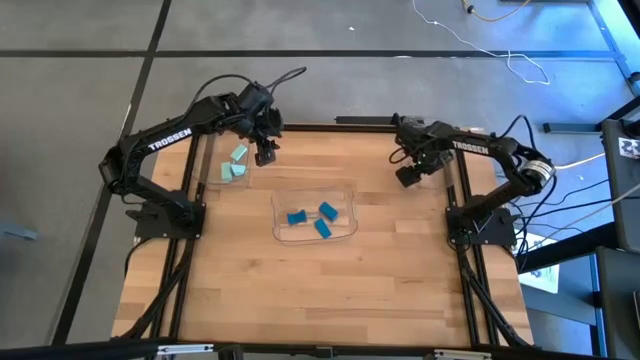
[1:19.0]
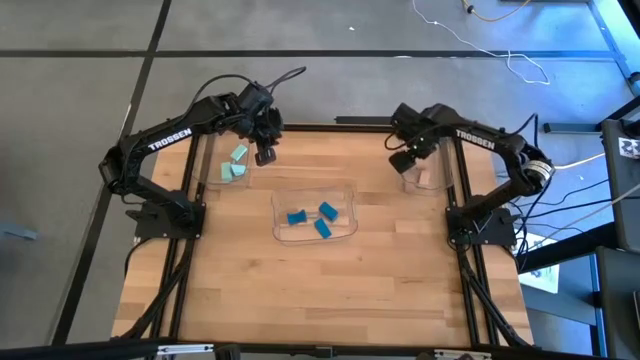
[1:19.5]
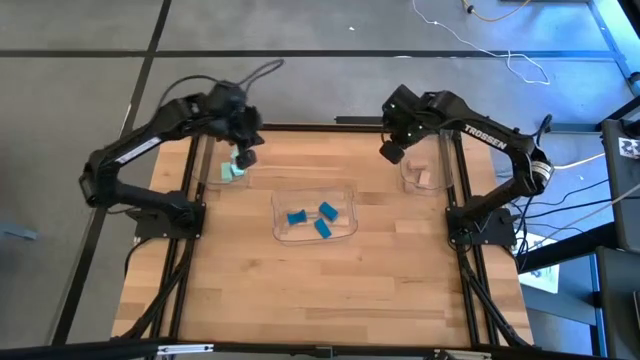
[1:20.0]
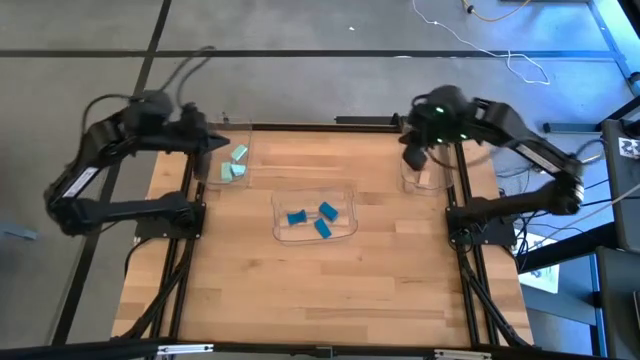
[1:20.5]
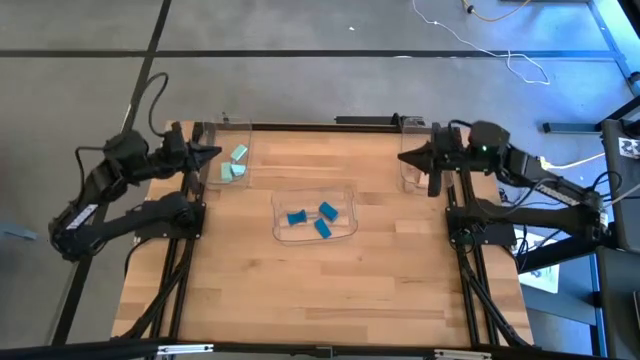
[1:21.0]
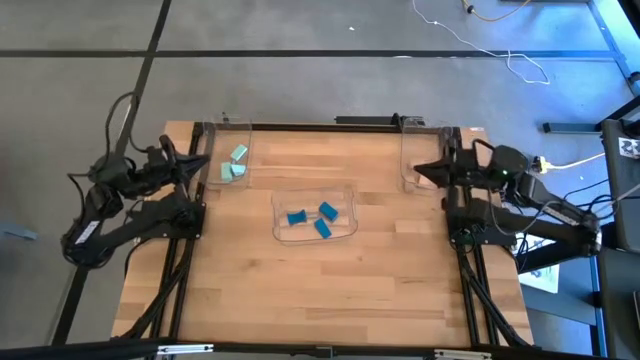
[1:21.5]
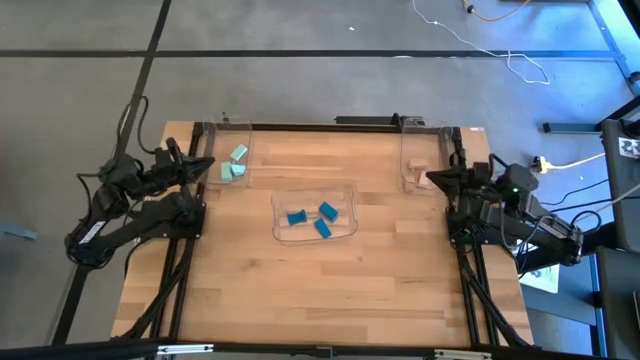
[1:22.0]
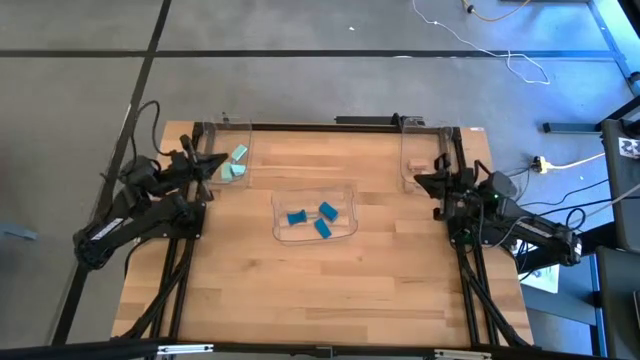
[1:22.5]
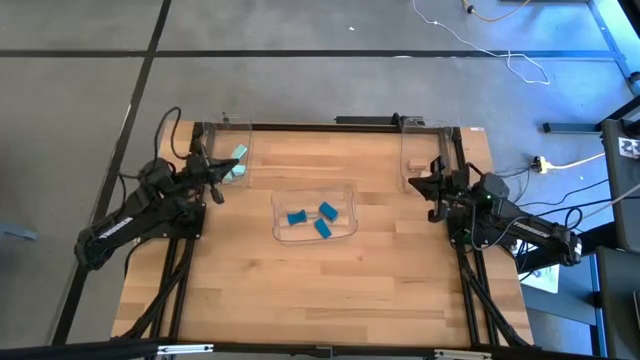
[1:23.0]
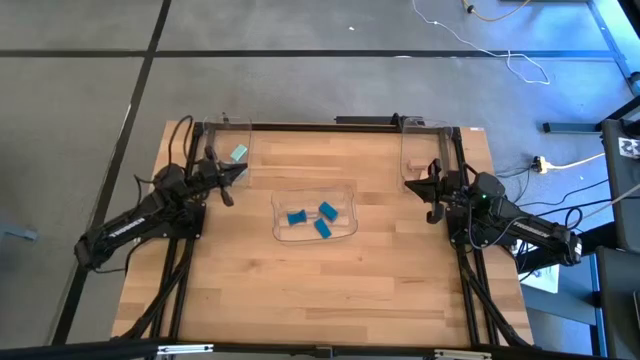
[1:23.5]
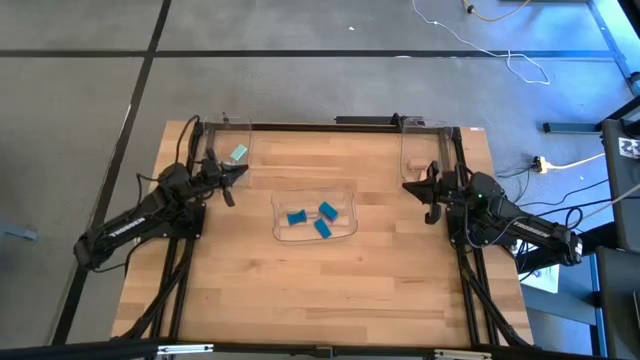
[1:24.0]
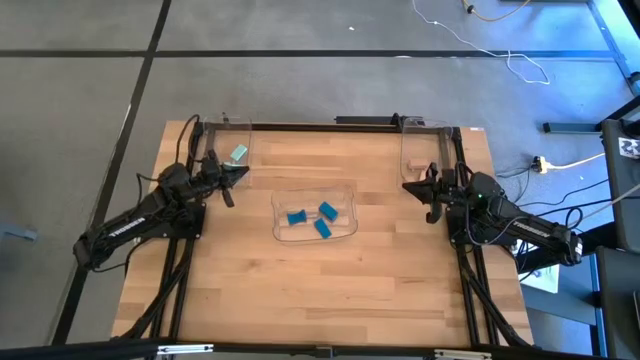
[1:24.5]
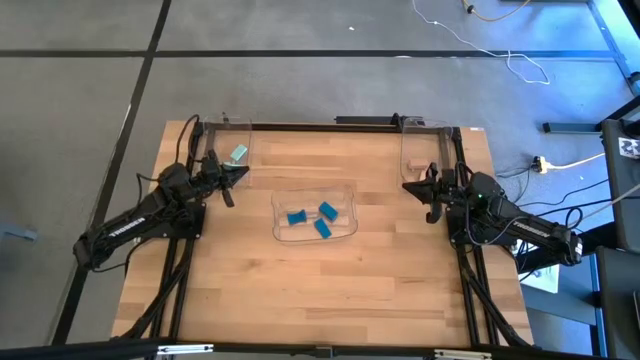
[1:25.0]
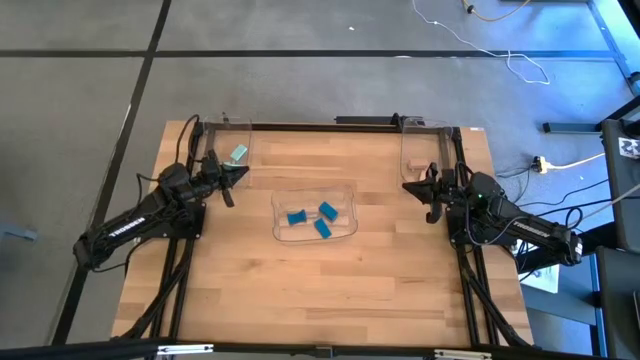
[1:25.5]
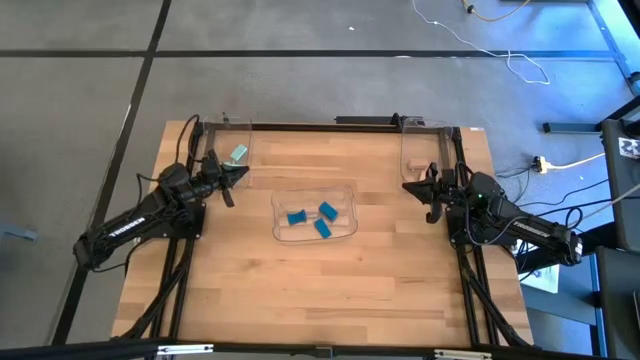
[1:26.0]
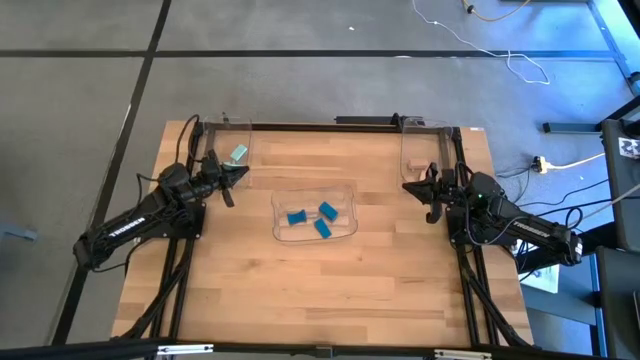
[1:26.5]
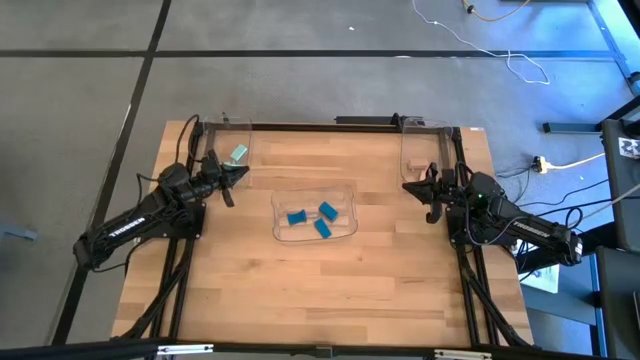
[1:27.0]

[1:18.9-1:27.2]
Task: Sort & place blocks by color
Return to Home Position

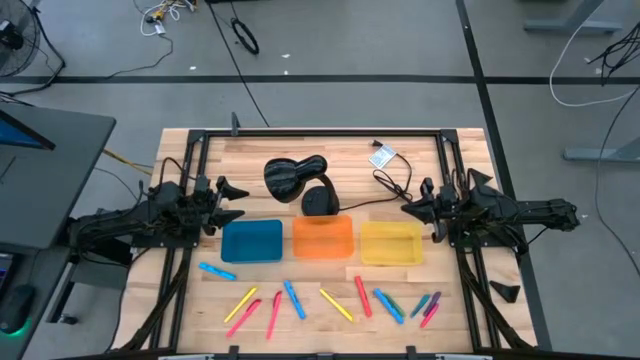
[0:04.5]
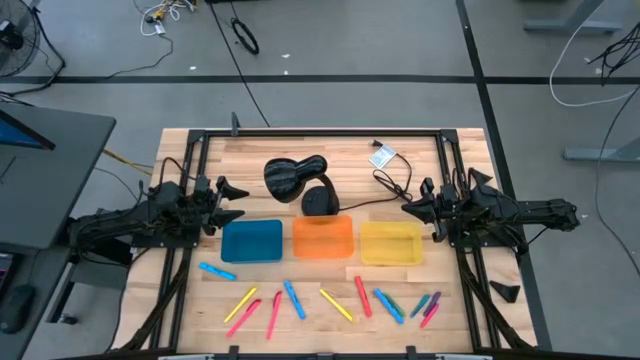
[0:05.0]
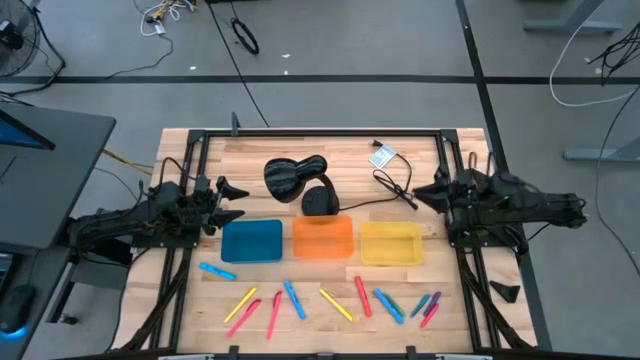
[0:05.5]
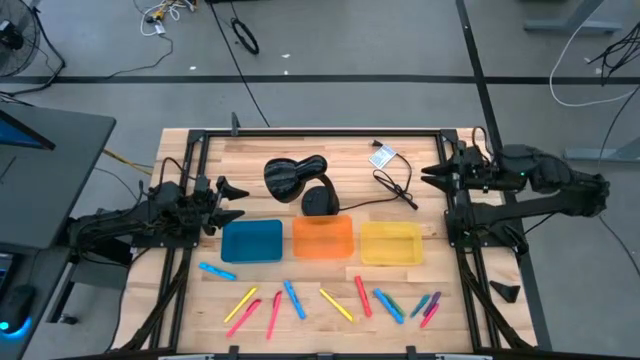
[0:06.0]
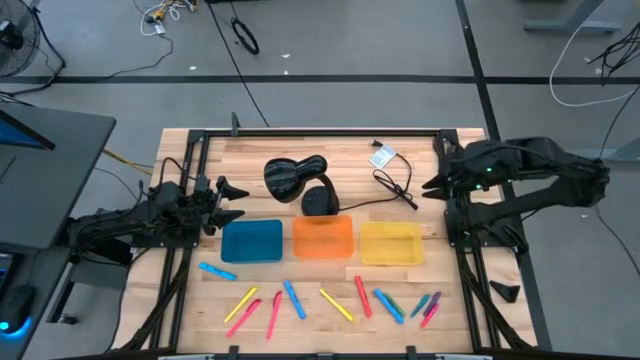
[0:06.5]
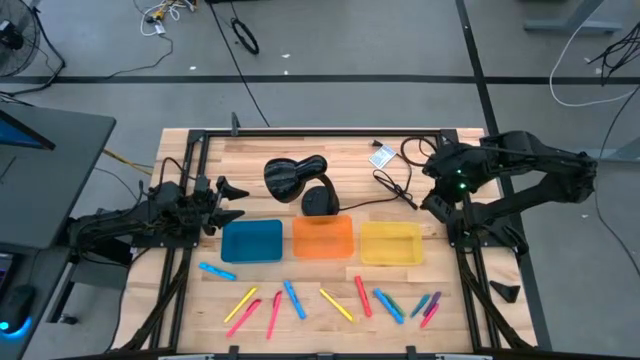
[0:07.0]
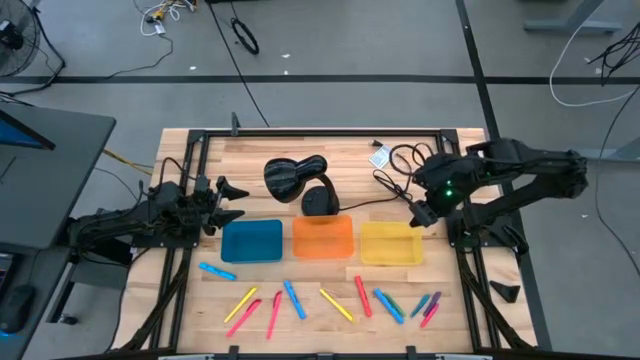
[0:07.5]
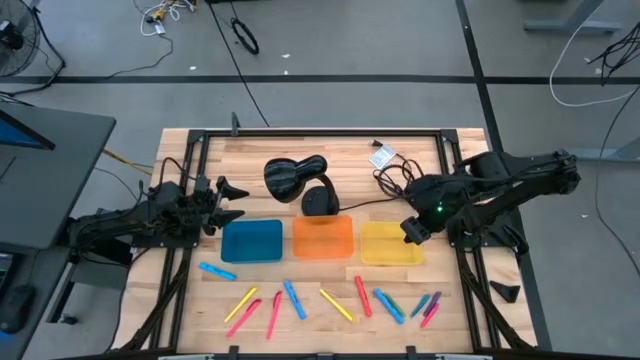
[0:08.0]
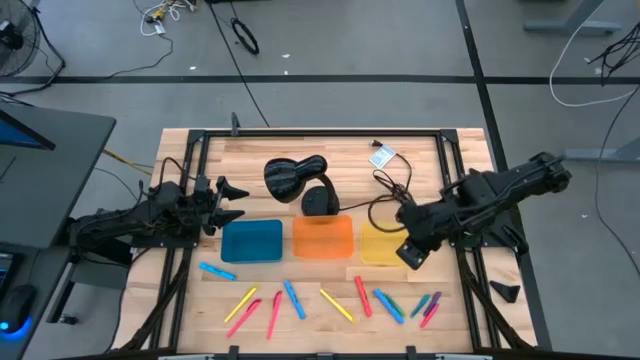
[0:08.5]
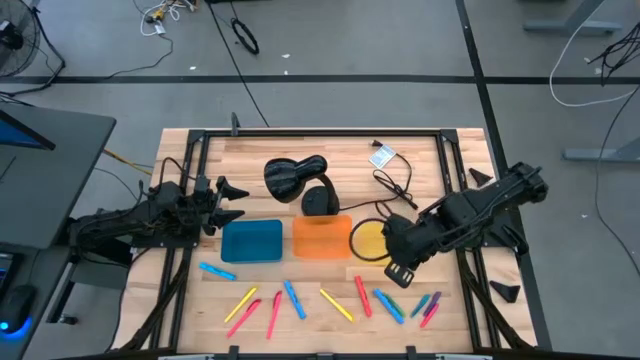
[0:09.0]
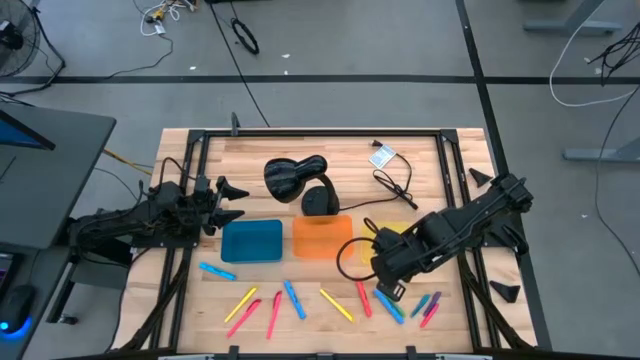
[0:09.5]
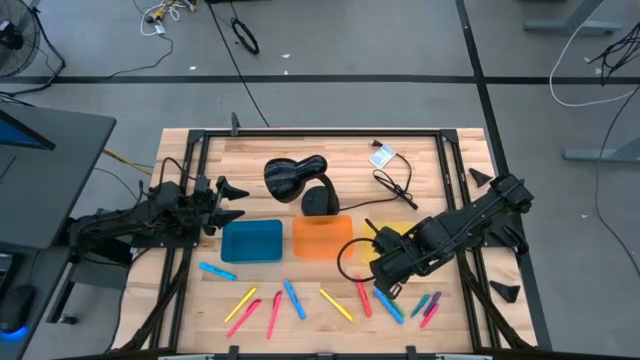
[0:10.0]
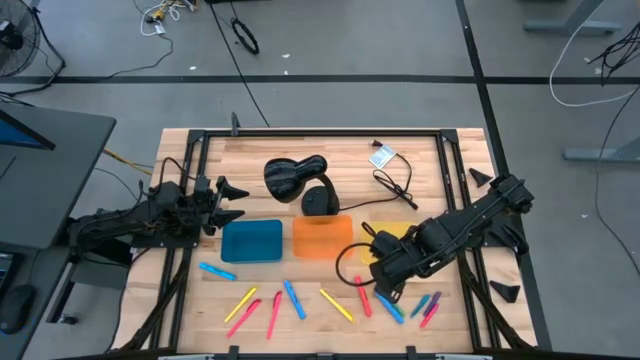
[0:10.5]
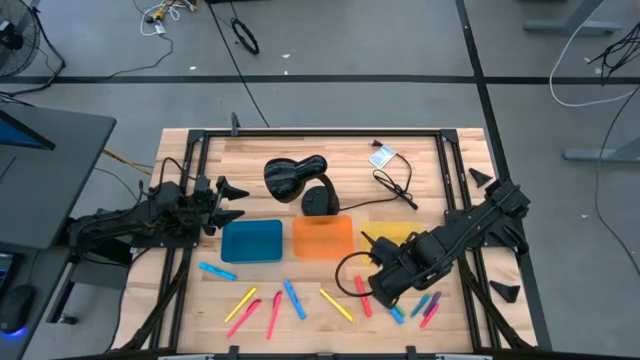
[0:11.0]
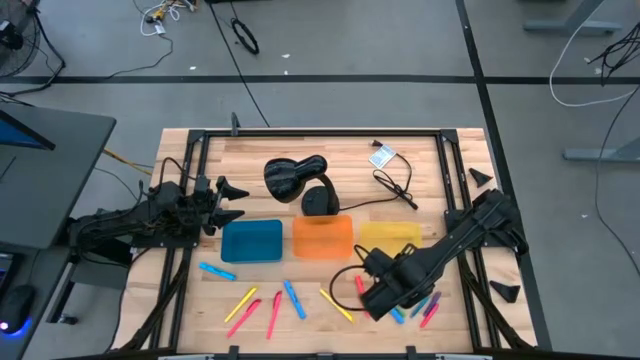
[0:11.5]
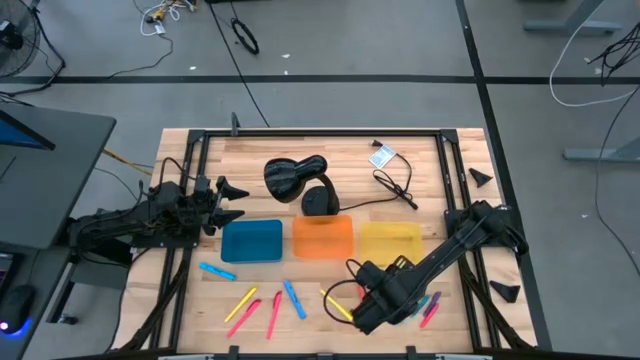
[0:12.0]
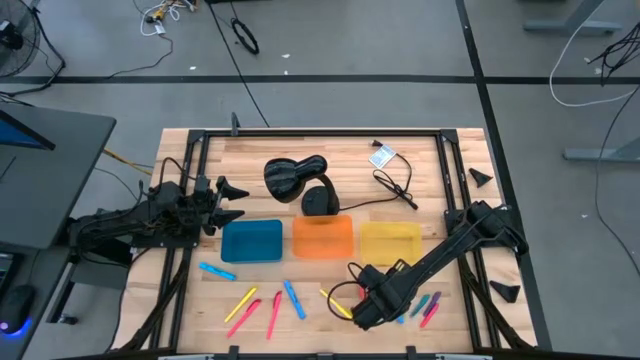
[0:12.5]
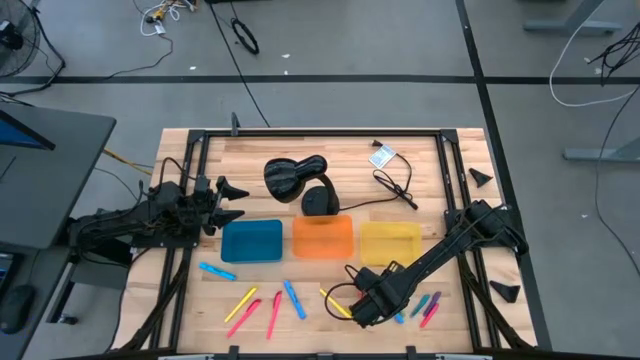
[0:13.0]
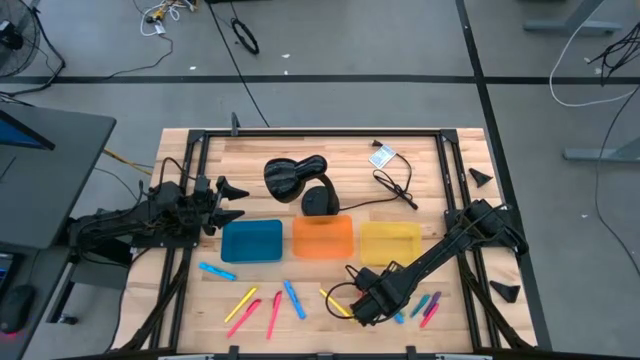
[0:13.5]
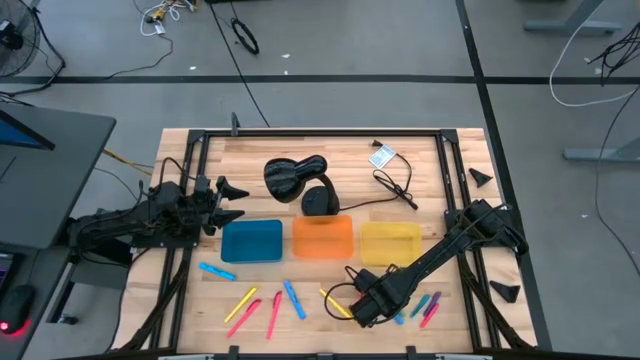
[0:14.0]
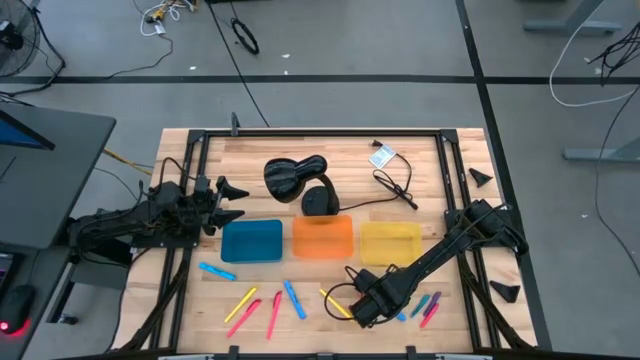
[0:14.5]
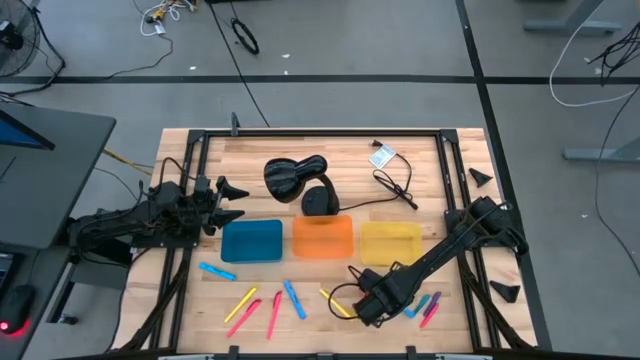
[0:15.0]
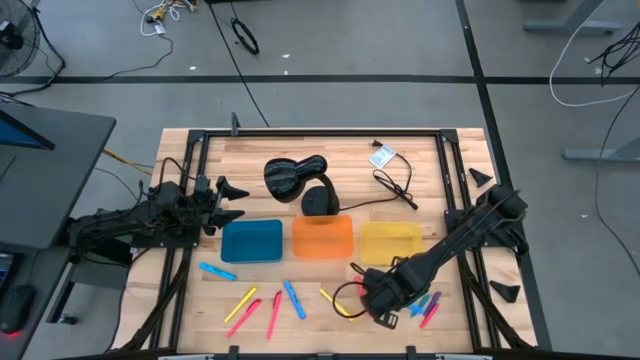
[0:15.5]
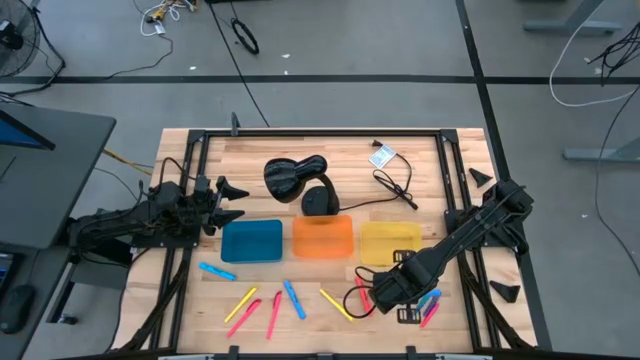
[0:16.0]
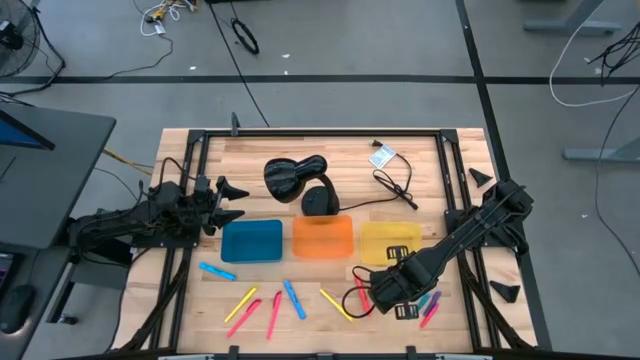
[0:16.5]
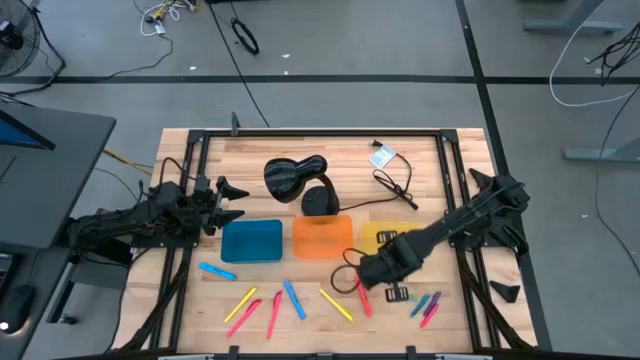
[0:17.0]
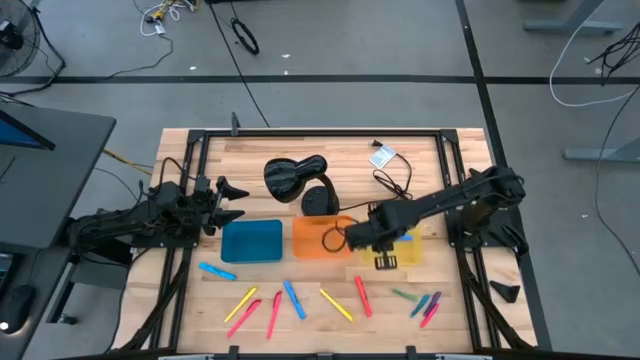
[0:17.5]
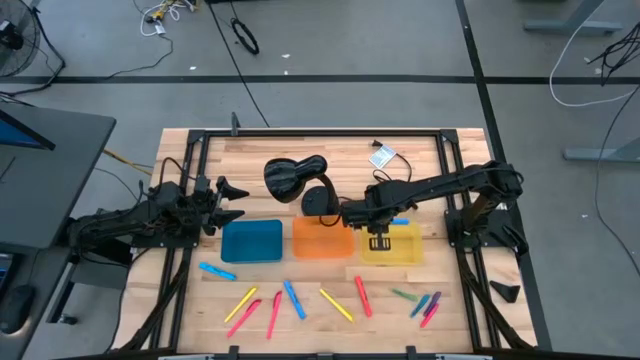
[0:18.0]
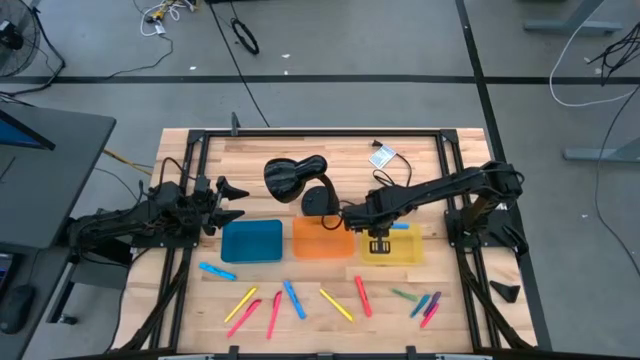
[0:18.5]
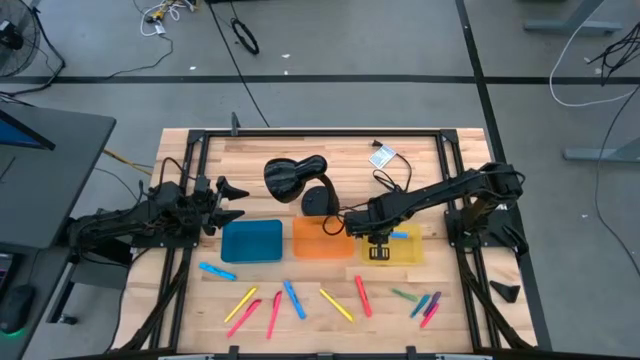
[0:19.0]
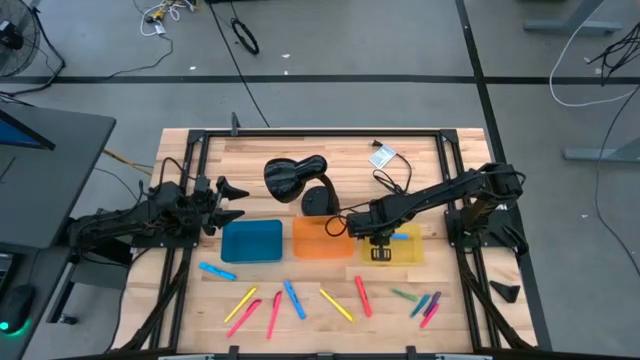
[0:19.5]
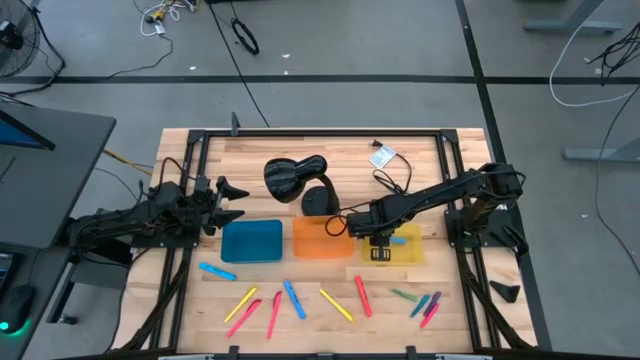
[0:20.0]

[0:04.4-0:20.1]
Task: Pick & Place Markers
Put the right blue highlighter pen into the yellow bin
